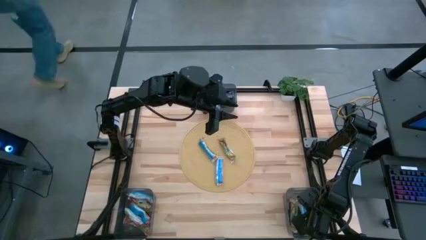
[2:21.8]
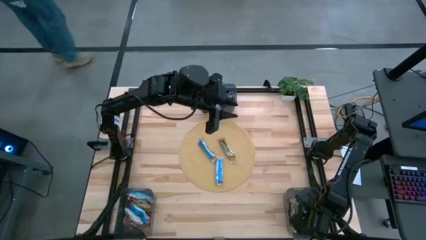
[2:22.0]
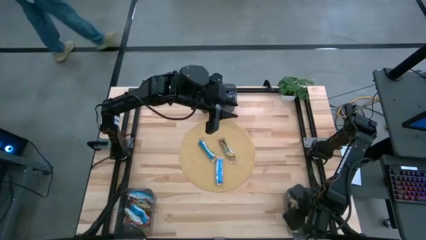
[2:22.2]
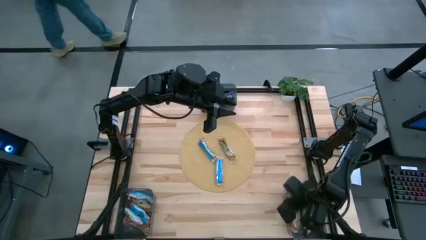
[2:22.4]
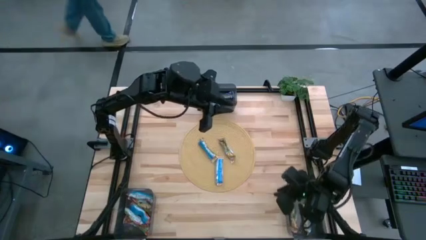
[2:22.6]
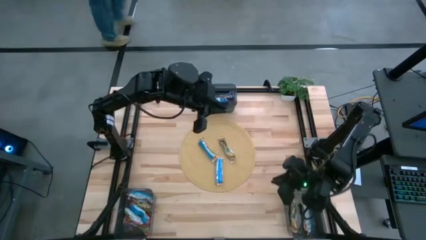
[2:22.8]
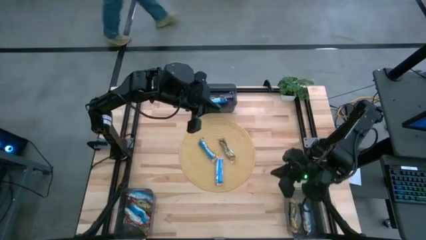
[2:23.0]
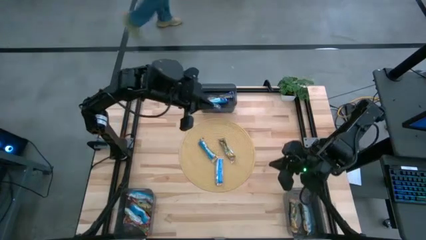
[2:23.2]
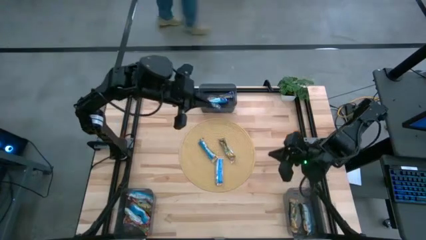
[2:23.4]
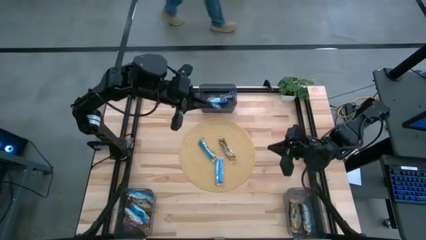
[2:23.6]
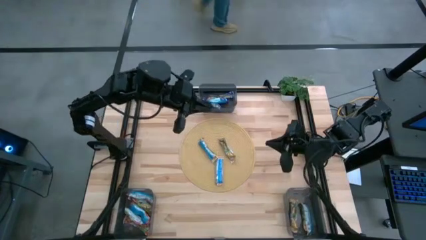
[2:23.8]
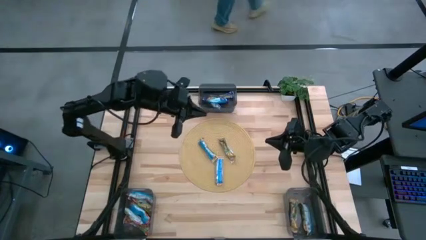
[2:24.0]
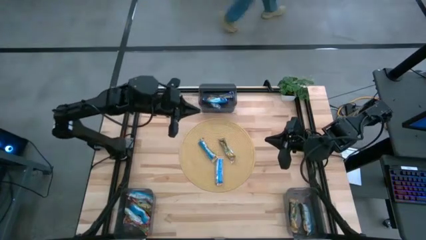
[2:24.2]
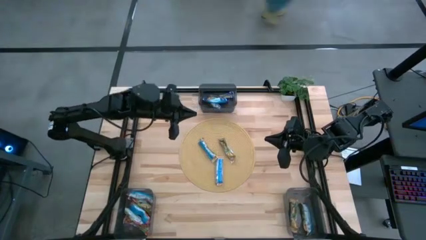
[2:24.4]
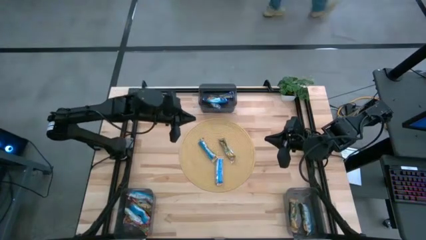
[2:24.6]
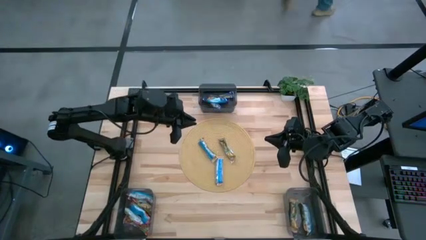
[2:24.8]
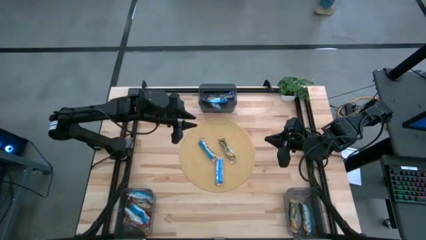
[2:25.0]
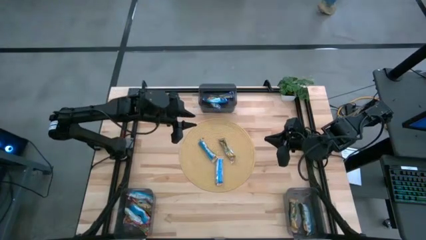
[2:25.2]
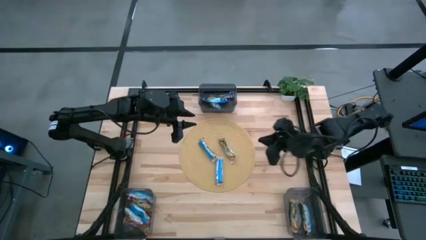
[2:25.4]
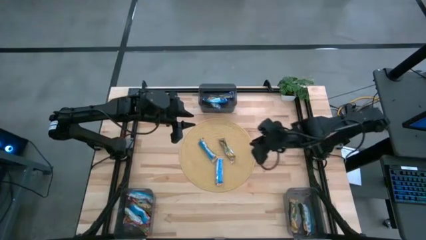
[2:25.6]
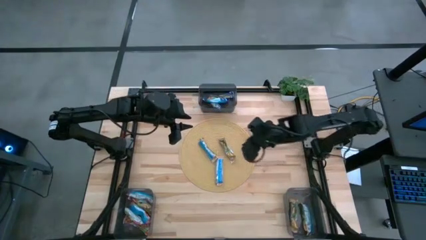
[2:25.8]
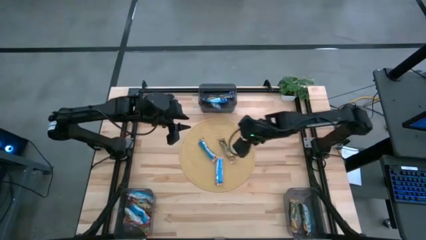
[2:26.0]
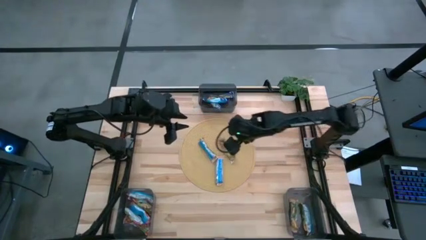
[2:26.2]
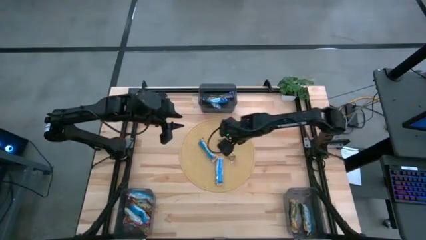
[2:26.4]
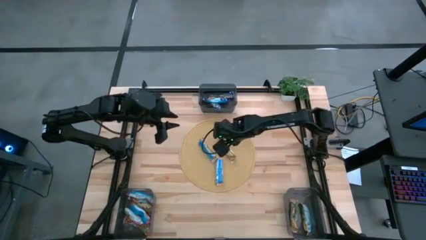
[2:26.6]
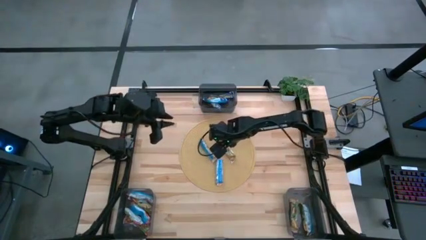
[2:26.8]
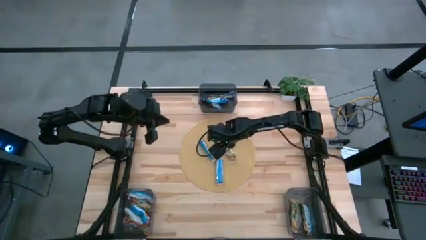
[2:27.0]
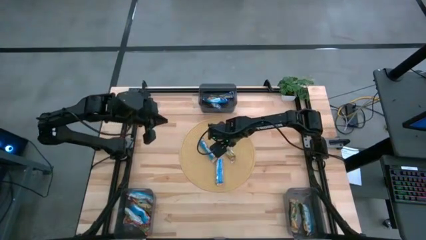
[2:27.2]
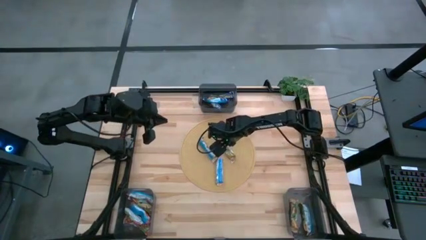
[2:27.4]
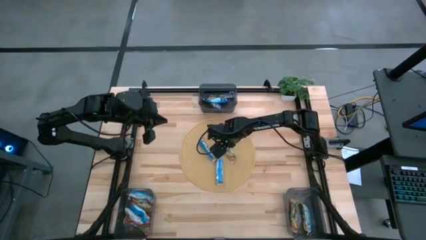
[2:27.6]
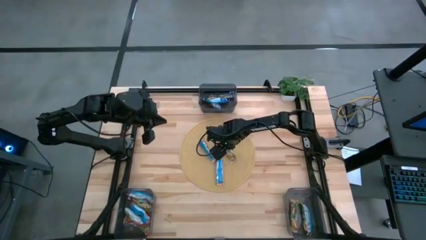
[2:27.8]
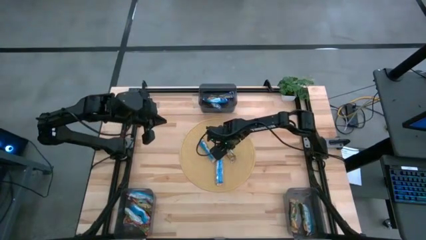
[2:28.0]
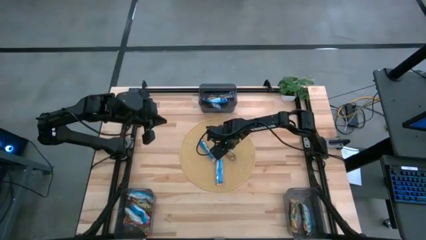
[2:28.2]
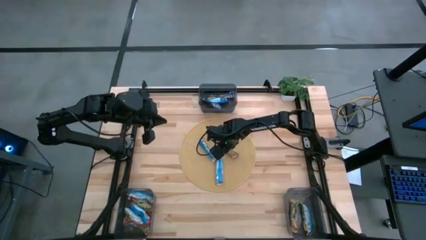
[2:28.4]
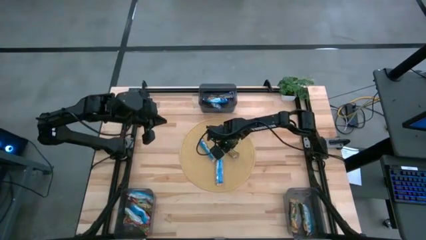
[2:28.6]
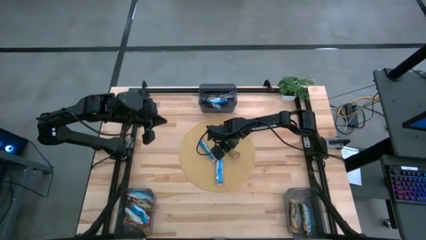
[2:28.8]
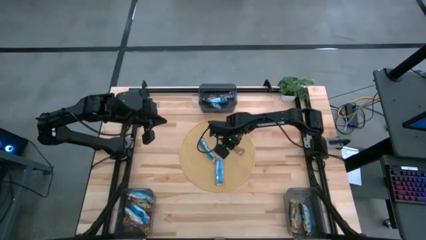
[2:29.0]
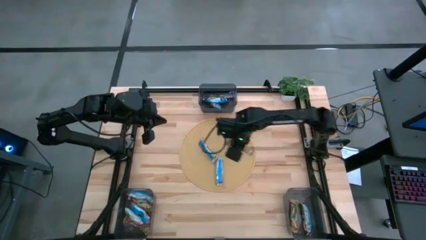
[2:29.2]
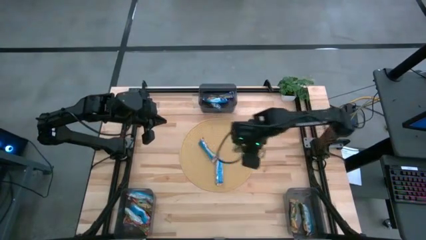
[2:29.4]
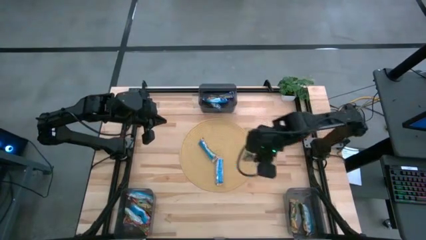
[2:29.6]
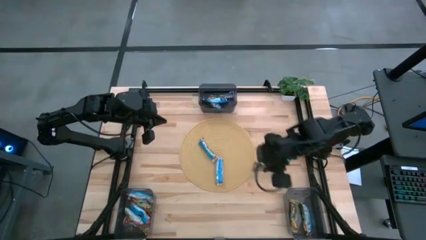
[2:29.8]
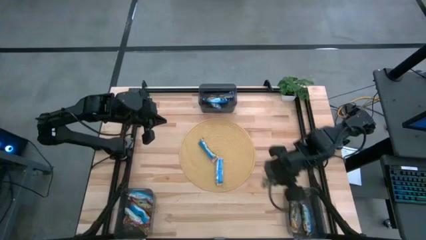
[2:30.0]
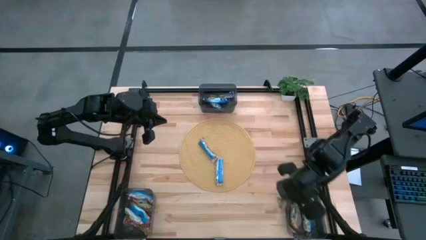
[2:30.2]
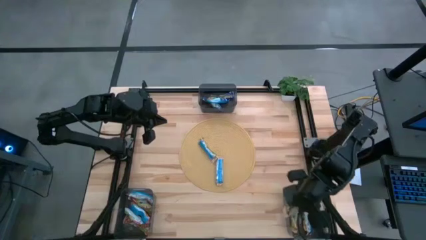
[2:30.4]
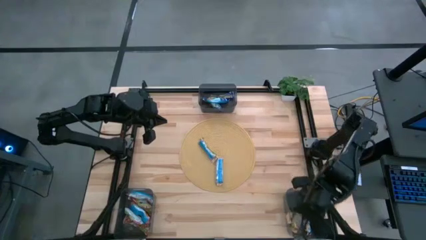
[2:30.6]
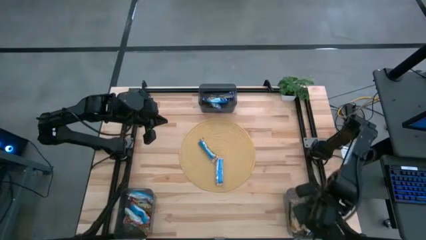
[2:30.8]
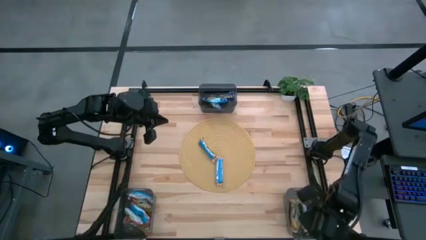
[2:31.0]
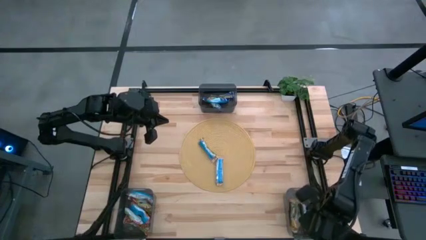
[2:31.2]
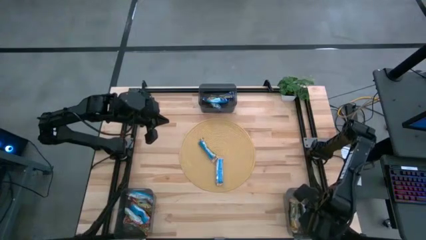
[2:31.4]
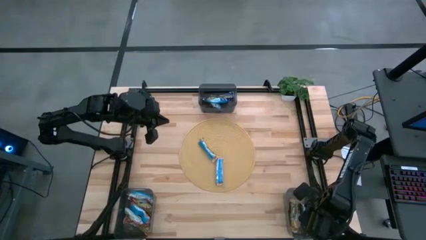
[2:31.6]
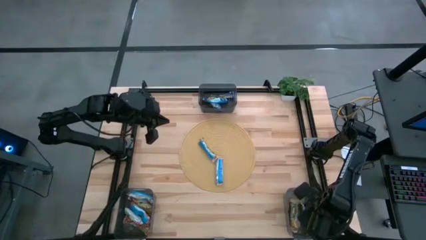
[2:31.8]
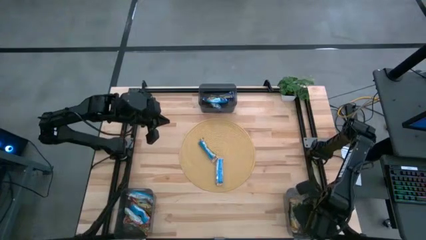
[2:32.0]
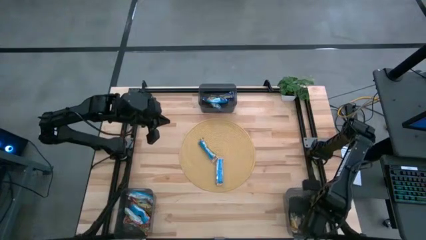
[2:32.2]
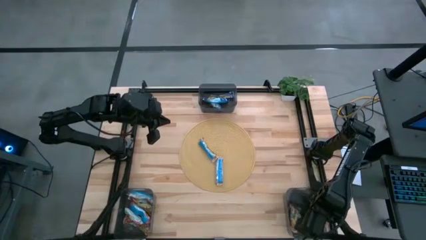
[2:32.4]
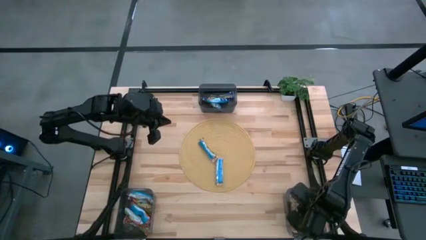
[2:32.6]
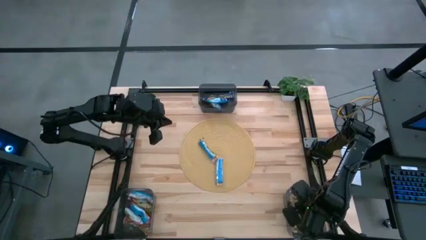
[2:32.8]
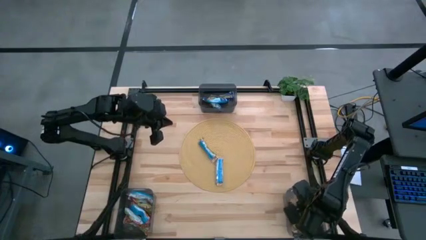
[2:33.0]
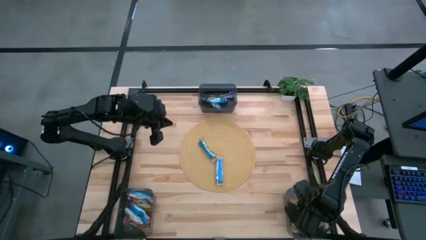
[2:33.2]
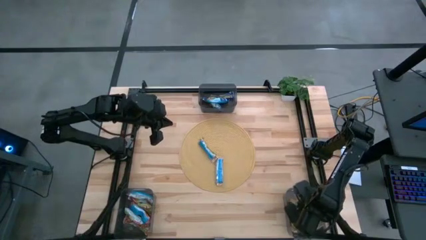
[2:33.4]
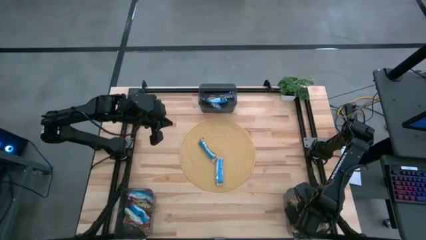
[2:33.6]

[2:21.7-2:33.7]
Task: Pick and place Granola Bars by type
Put the yellow granola bar into the right black bin

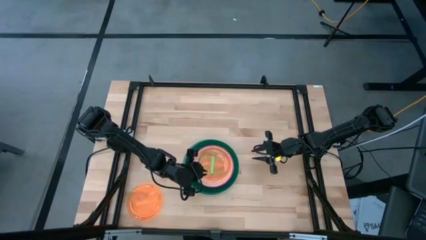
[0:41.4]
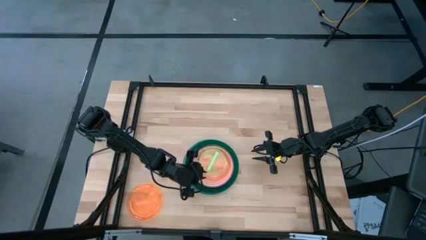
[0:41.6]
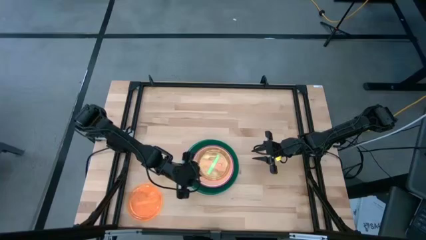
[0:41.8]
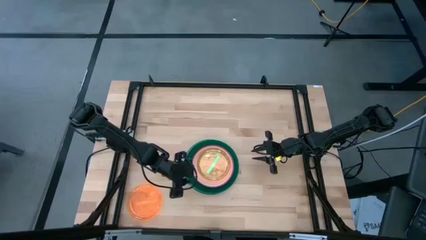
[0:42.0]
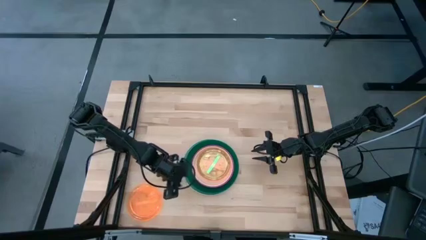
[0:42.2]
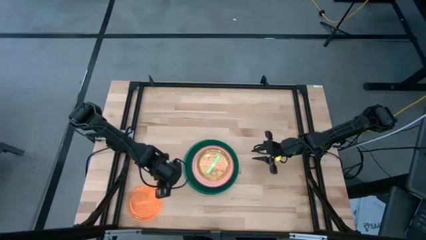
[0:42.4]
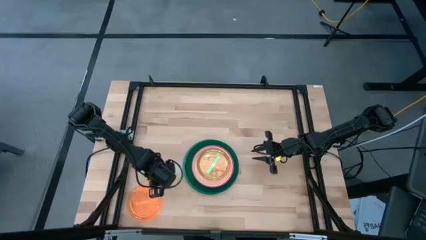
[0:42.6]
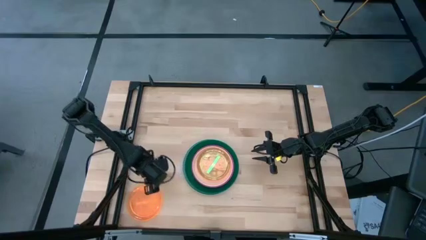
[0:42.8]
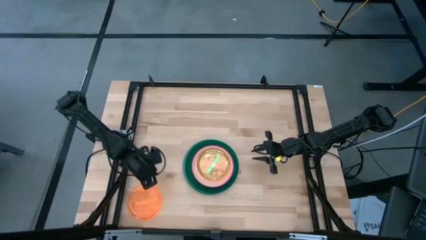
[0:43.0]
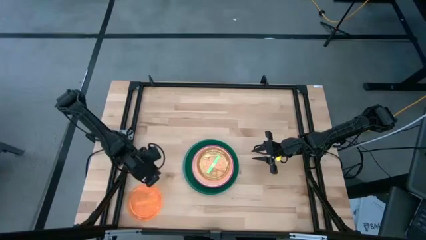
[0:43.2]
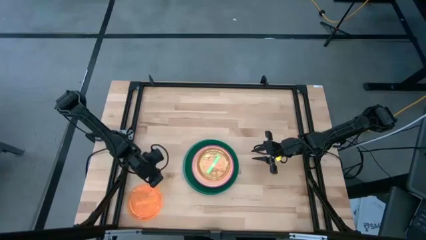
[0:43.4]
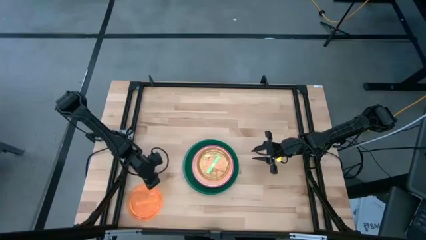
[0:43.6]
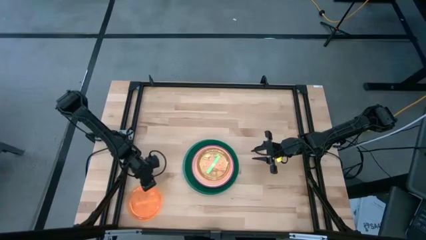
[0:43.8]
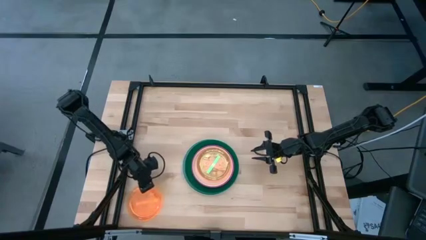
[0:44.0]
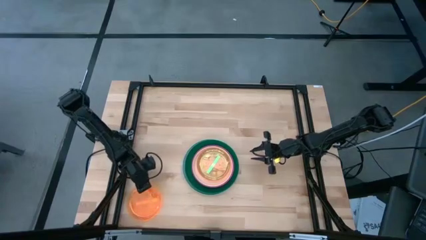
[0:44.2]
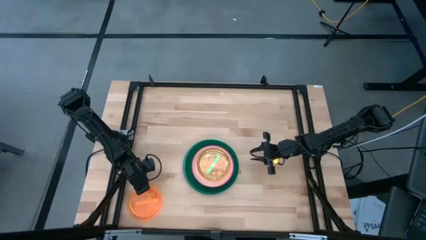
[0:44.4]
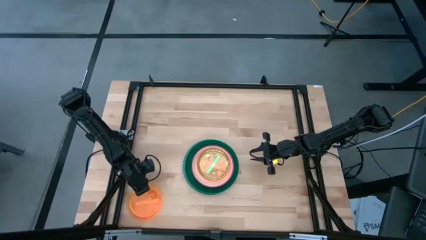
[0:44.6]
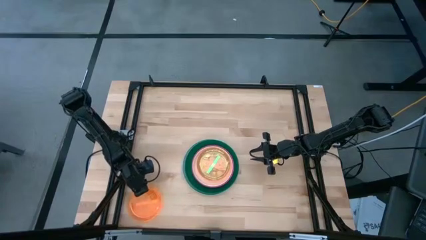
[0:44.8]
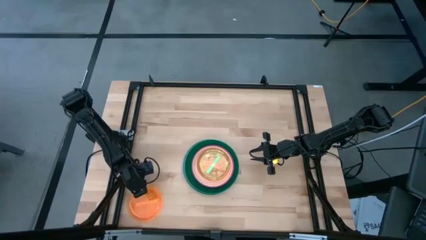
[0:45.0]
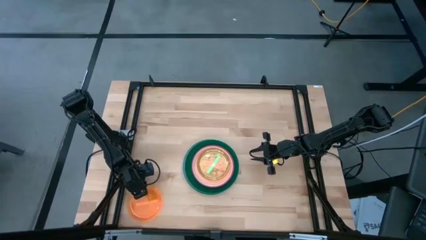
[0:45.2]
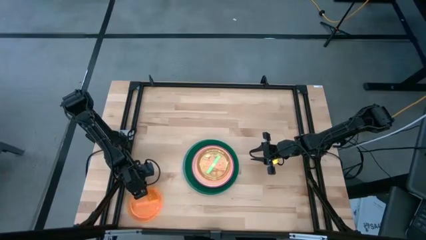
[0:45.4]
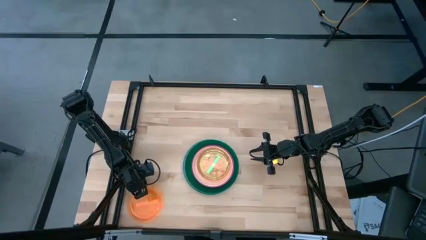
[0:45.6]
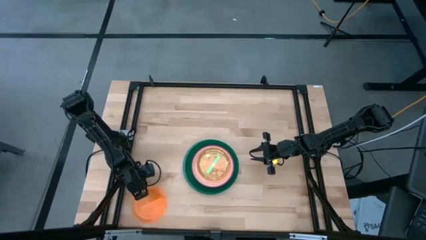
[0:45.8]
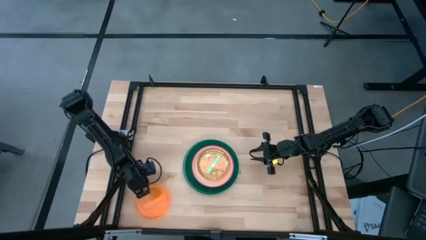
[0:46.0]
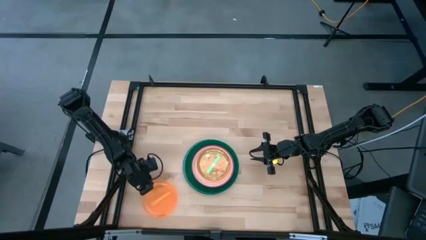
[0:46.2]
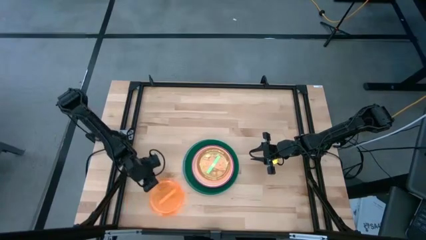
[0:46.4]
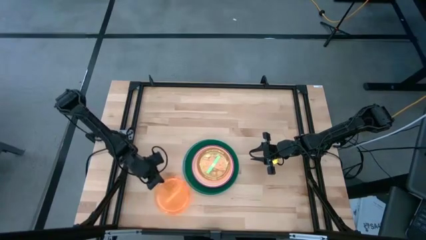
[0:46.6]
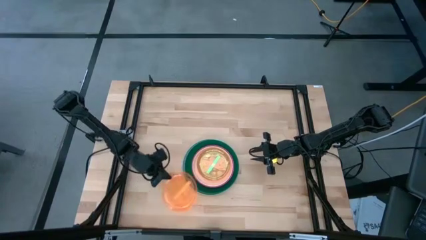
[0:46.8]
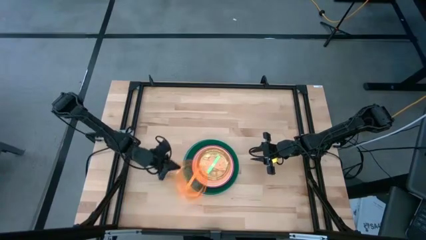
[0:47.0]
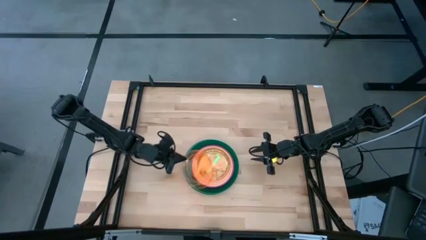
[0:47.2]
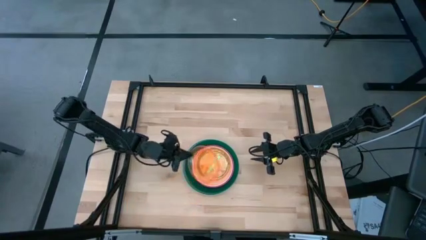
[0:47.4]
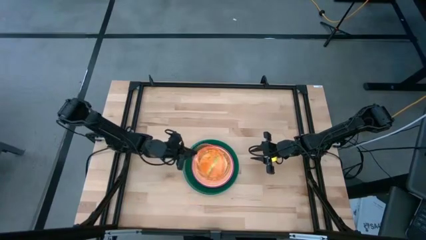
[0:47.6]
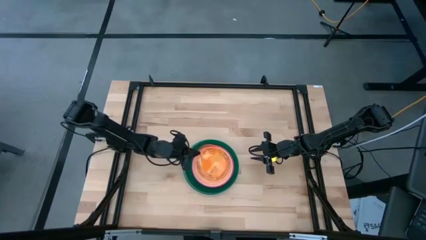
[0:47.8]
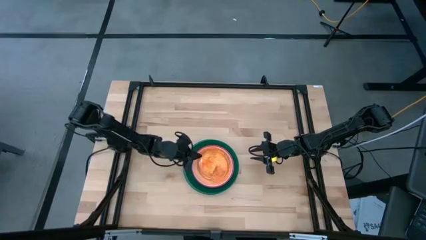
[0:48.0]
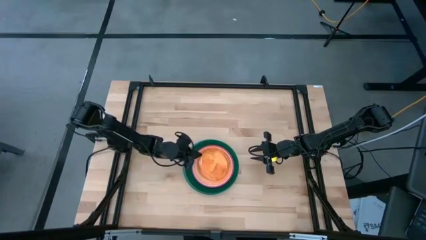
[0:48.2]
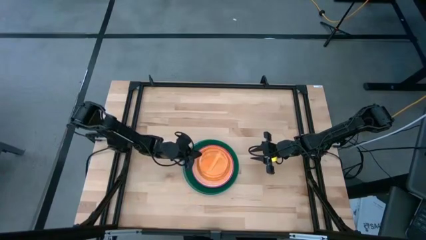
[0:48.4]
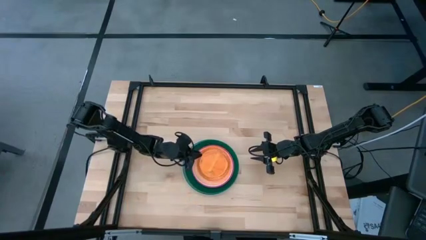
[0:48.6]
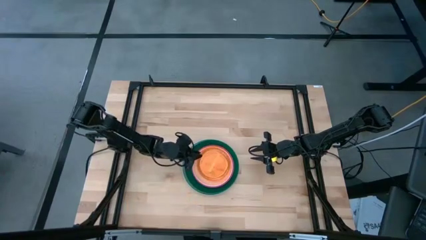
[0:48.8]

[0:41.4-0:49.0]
Task: Stack plastic plates
Stack the light orange plate on top of the light green plate
